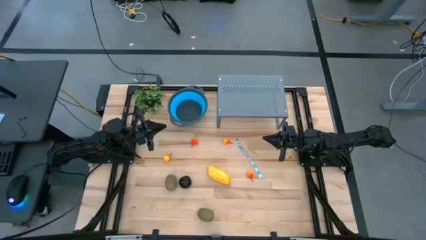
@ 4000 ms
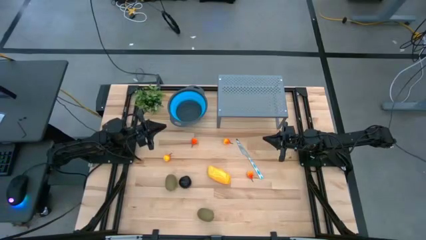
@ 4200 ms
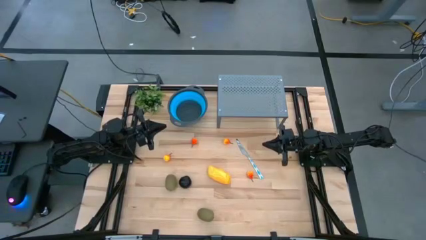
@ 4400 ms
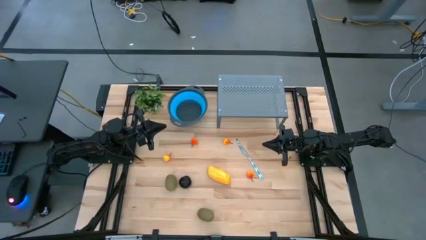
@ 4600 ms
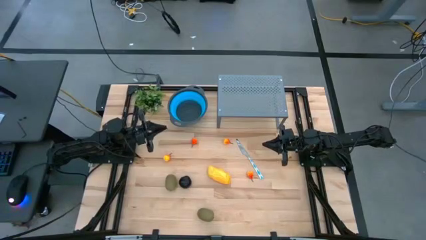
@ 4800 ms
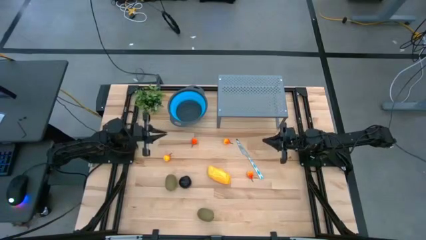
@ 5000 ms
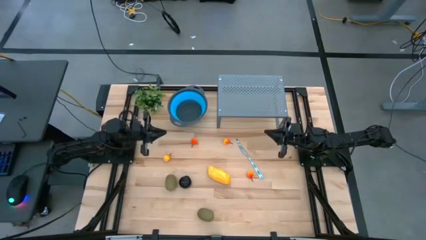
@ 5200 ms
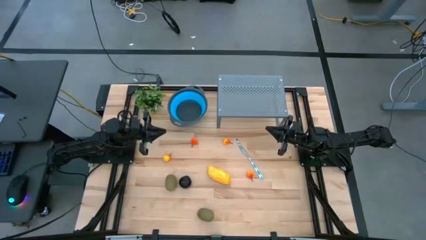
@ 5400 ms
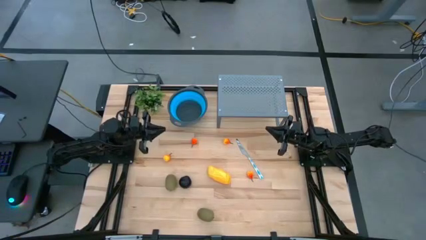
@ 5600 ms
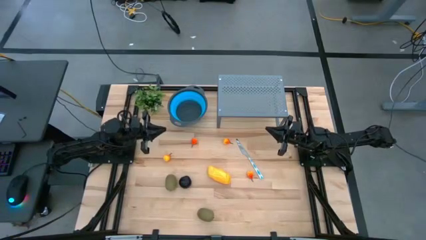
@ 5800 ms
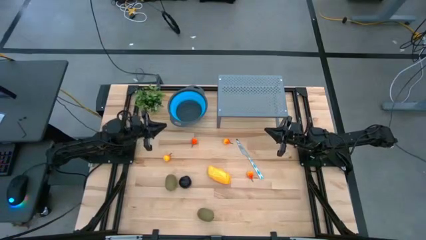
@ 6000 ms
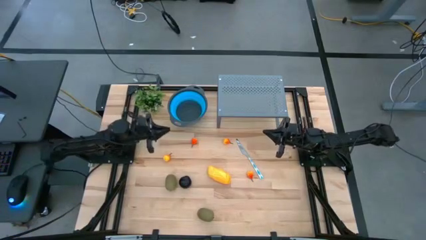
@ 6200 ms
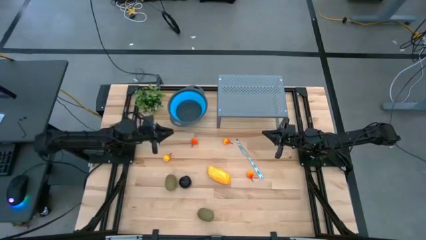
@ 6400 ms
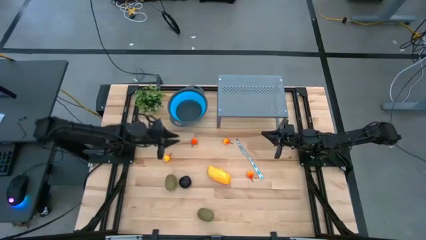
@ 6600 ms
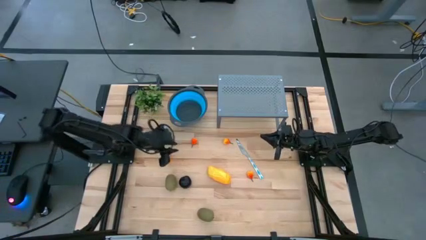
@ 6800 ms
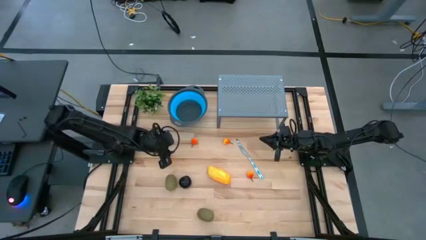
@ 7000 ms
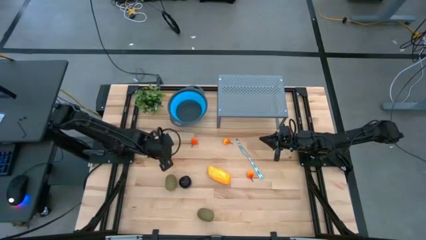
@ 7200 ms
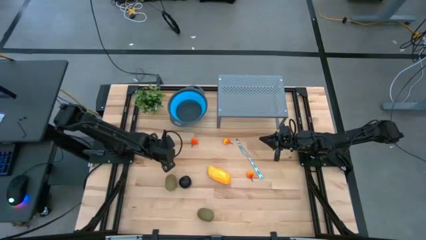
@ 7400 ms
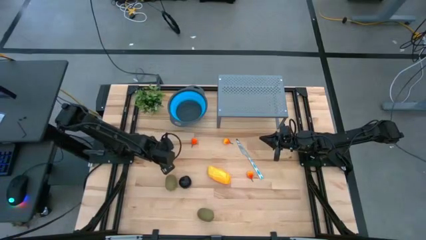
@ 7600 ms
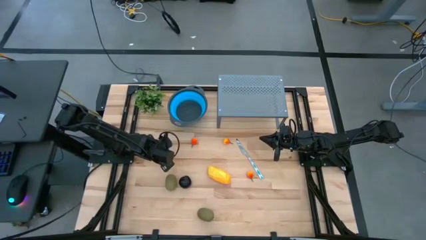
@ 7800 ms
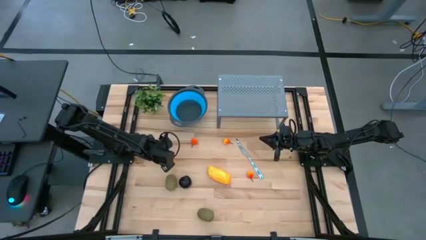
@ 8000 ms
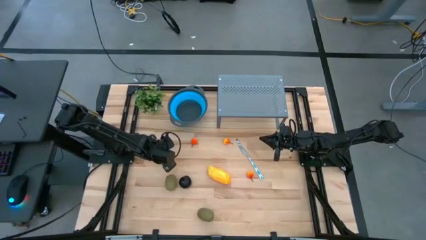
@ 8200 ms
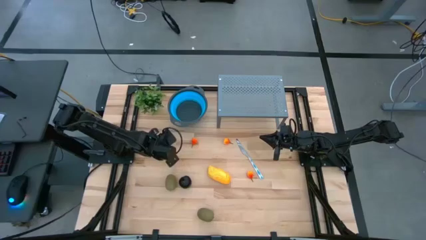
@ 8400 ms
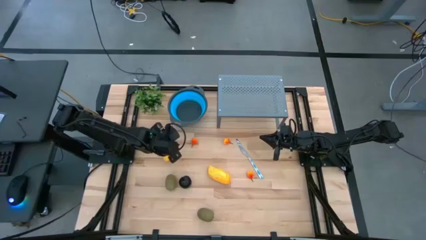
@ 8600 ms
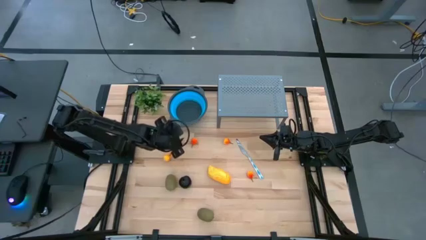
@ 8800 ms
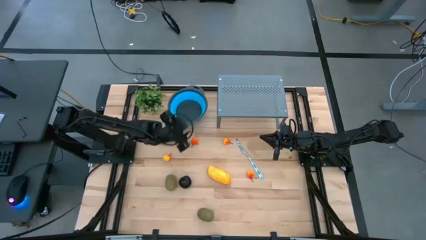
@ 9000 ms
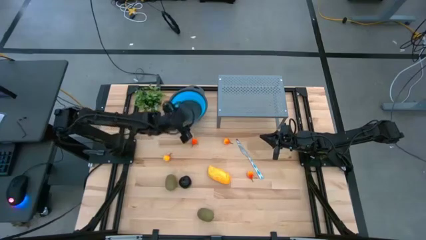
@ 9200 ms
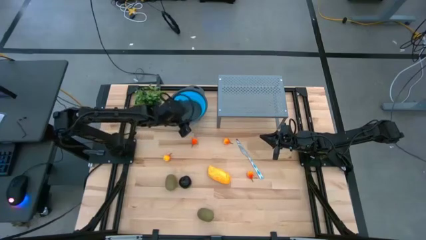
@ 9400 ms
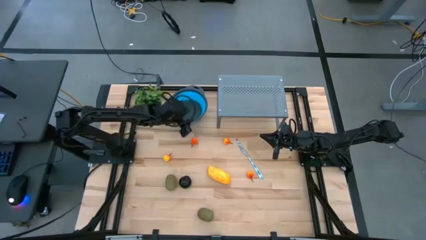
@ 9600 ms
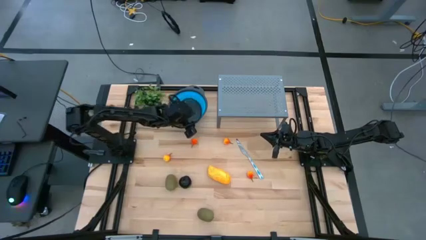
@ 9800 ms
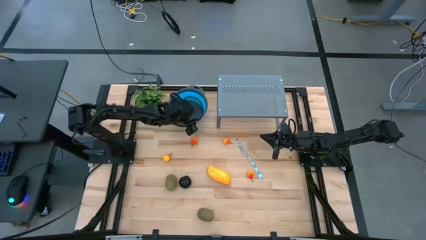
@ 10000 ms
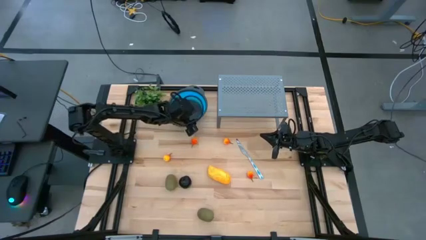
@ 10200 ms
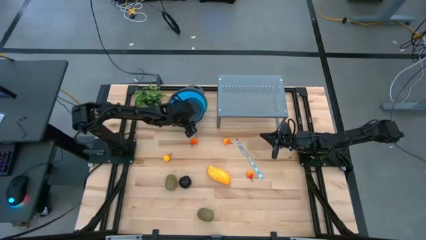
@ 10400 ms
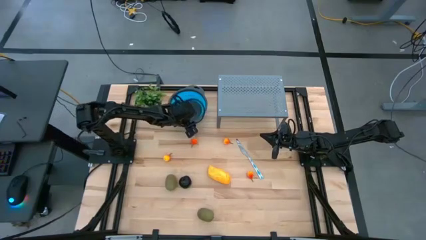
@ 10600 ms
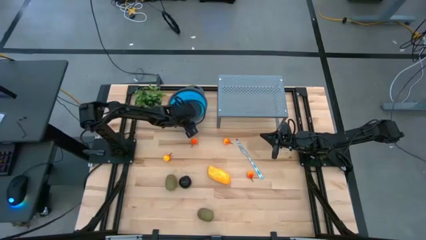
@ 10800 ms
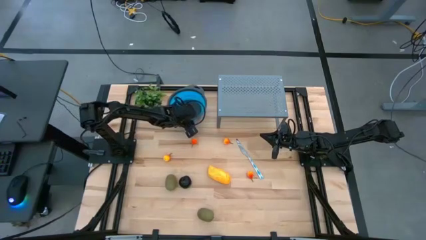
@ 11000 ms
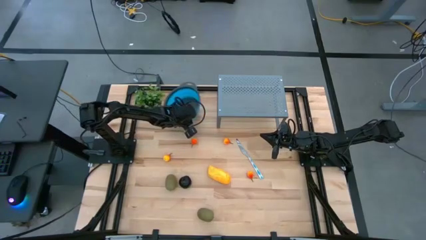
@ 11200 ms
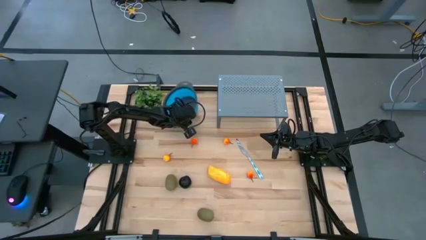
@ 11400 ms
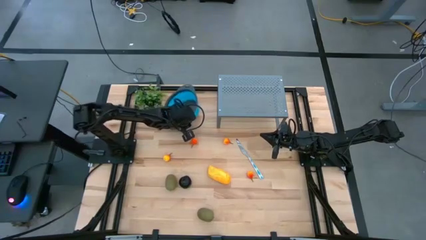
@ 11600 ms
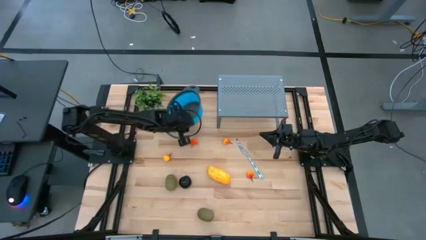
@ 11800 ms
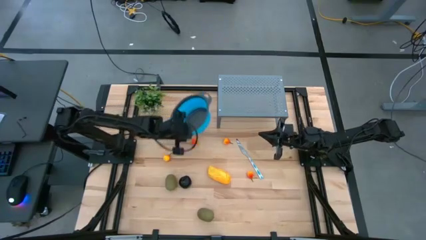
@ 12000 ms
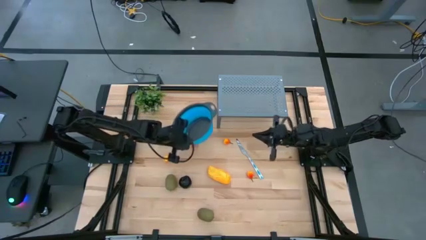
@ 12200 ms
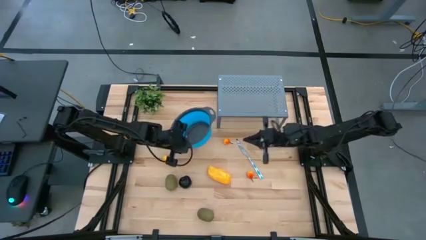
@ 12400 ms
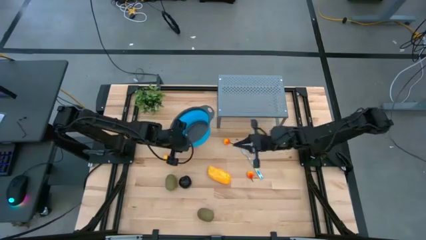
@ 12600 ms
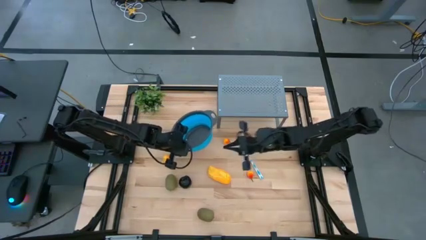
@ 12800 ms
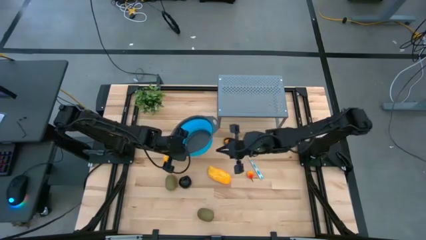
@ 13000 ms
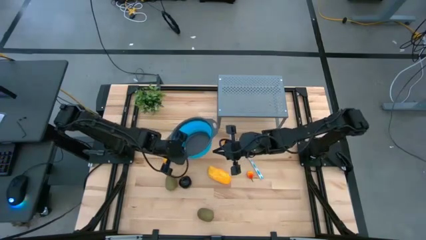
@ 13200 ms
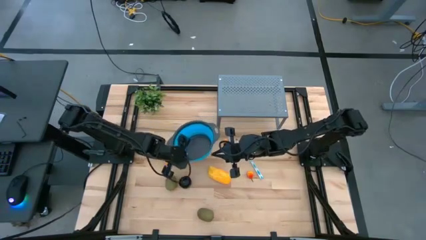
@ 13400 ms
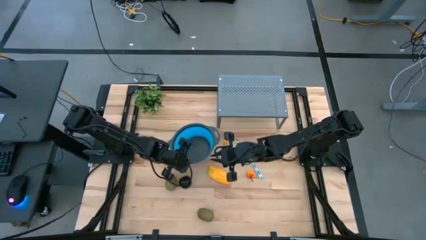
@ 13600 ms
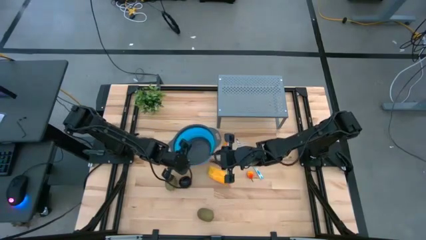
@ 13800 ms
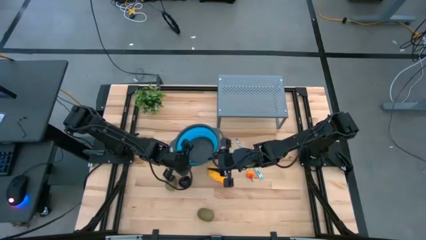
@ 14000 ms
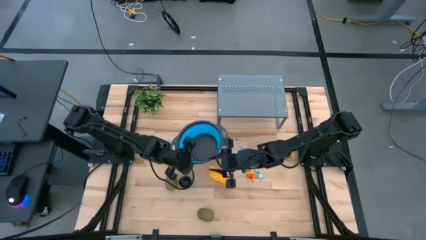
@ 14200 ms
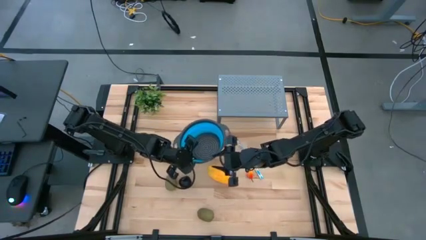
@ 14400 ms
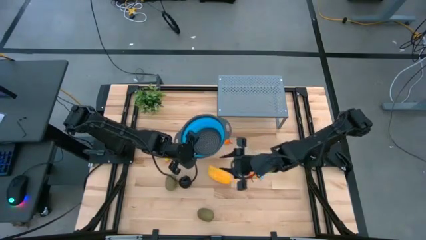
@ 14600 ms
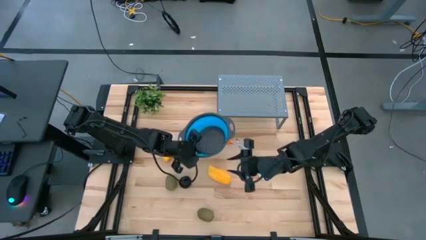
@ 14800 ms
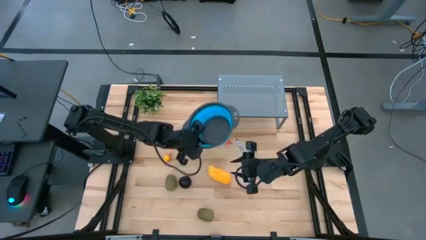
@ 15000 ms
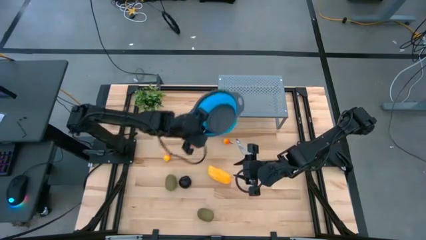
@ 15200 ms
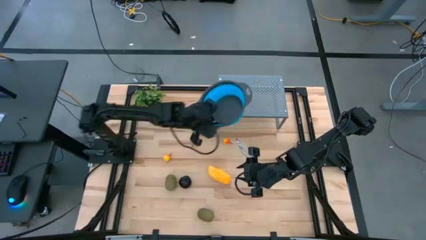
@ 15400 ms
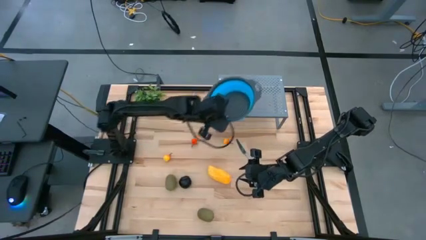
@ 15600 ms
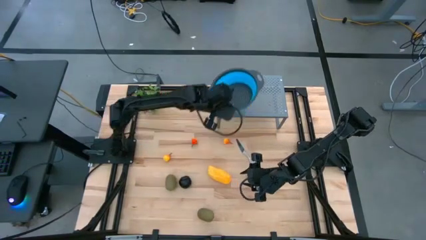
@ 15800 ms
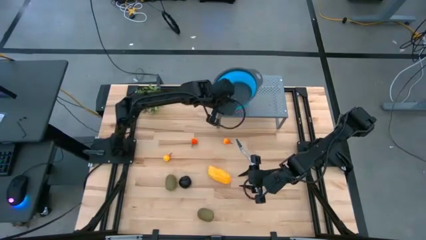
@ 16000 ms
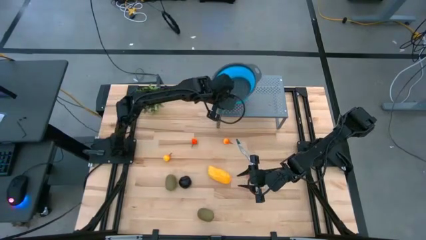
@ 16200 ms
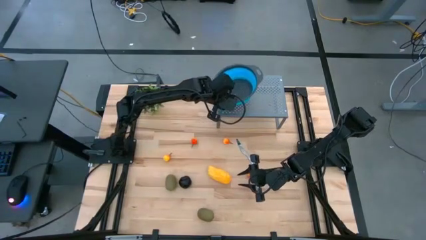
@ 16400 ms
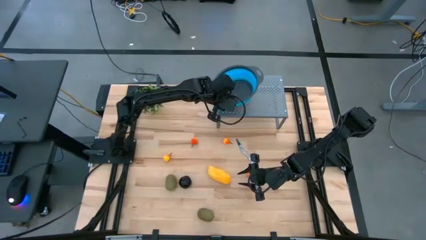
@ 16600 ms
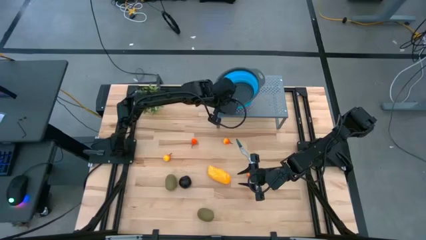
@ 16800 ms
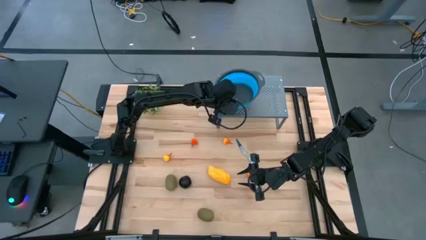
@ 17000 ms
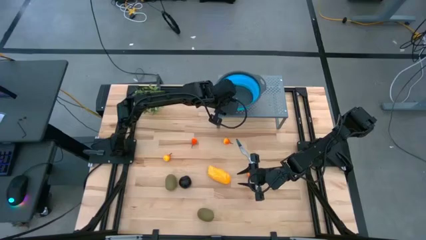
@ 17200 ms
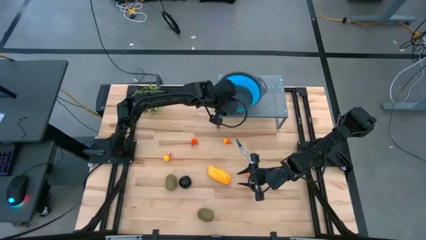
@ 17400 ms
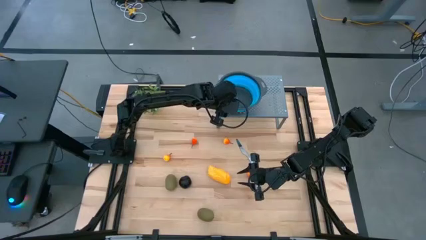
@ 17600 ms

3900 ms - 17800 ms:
Task: Pick & Place Fruit
Put the blue strainer bowl on the shelf
